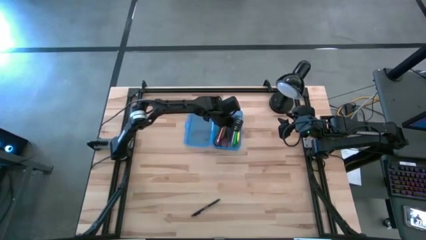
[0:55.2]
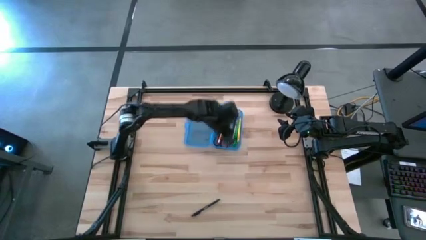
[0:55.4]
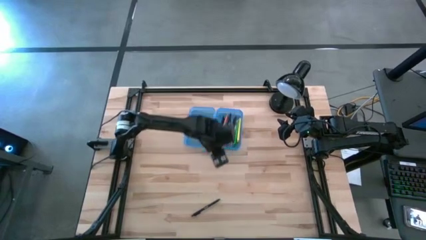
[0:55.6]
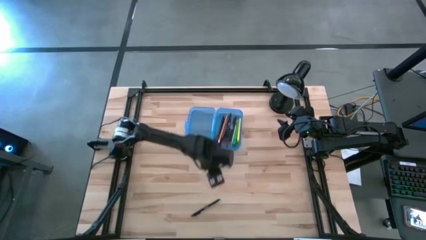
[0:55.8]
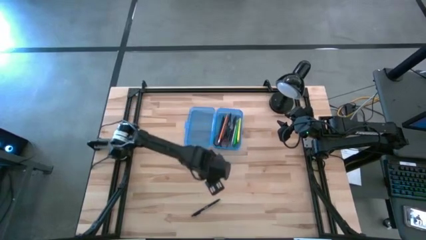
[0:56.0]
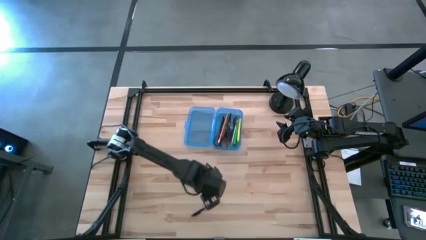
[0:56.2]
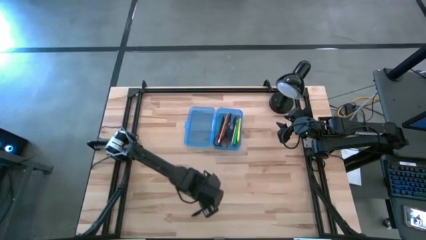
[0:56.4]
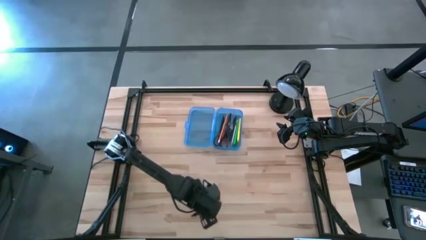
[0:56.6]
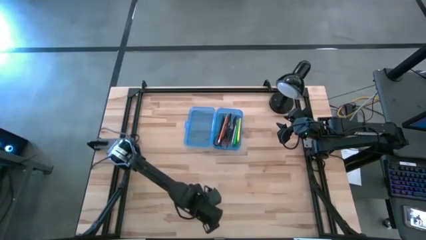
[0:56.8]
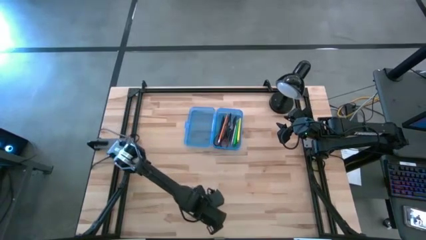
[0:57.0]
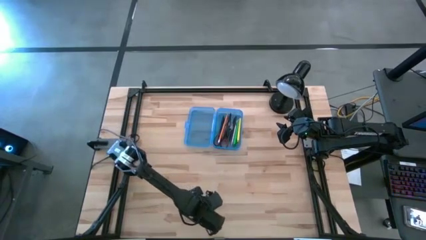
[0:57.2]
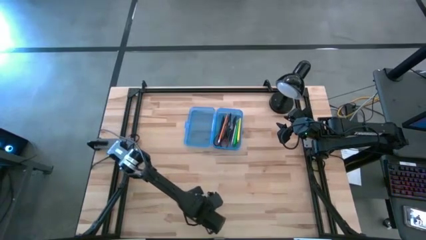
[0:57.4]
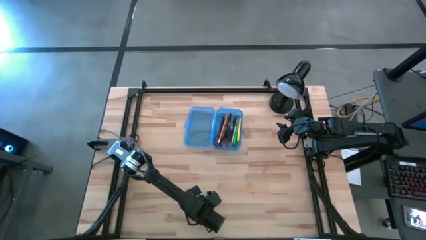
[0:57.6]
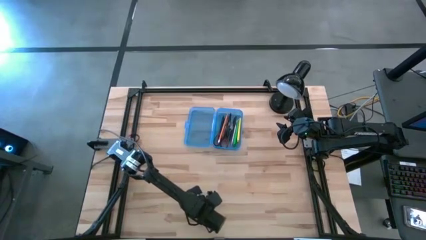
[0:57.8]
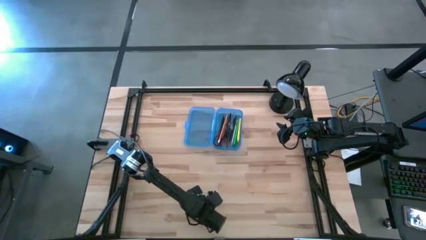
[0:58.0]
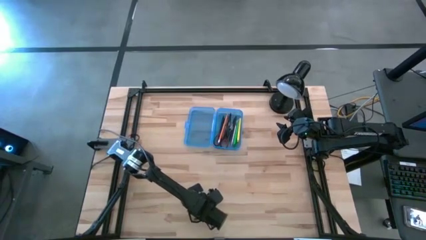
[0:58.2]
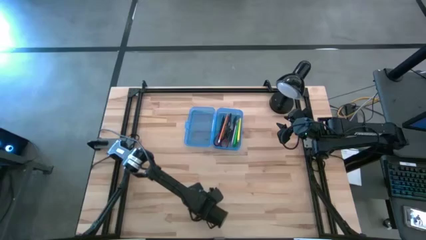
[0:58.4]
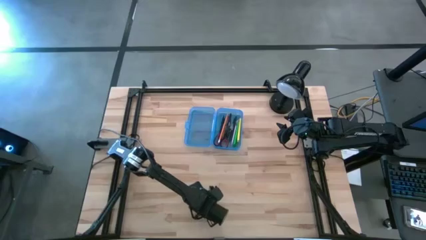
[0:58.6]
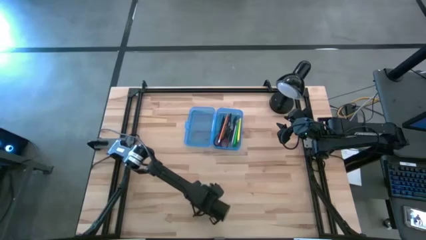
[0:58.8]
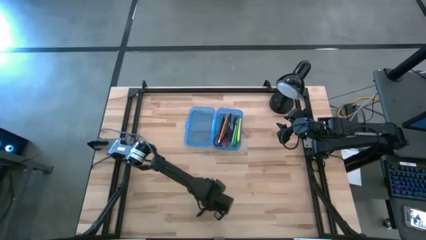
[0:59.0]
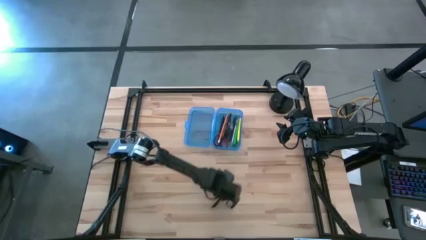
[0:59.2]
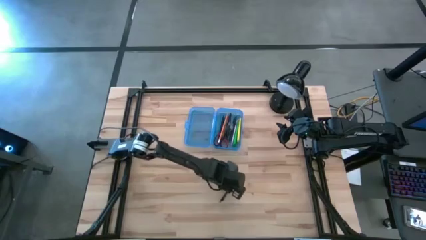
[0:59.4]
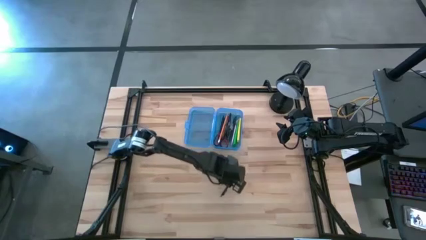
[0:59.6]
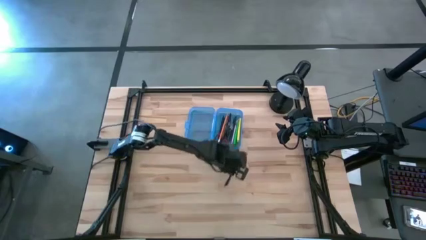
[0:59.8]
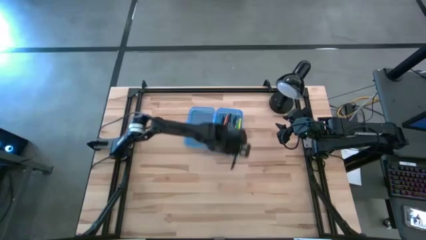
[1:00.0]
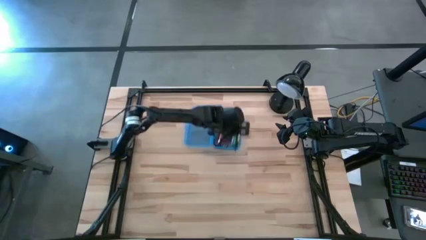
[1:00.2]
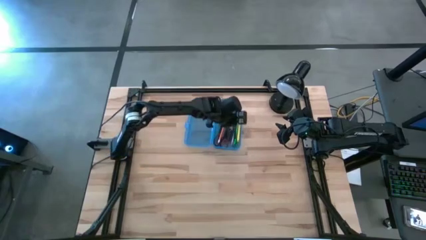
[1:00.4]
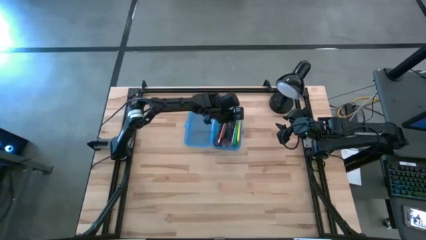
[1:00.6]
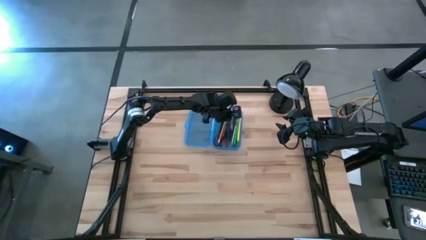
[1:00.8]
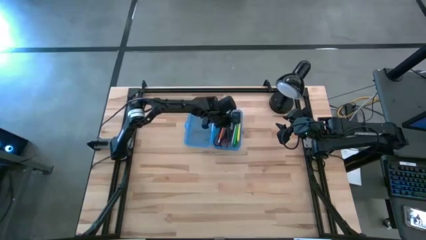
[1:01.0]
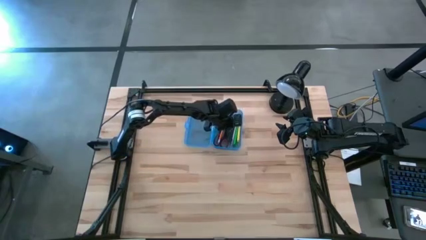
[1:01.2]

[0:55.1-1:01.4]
Task: Pick & place school supplies into a supply box
Put the black pen into the blue box

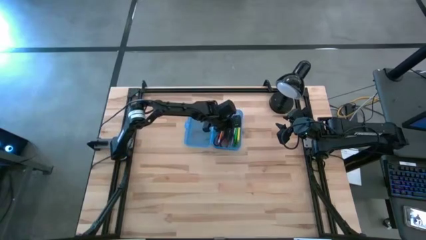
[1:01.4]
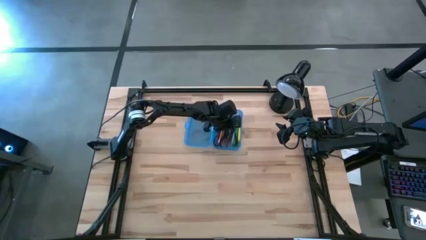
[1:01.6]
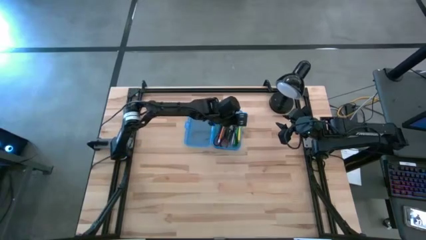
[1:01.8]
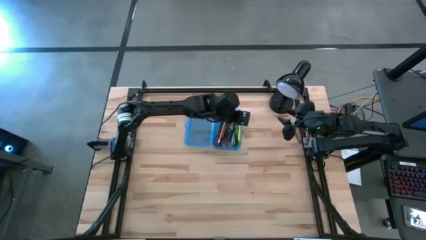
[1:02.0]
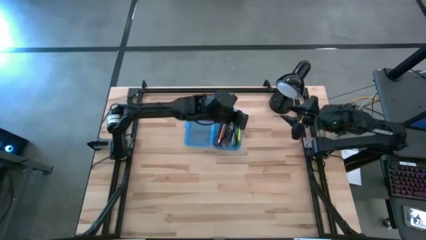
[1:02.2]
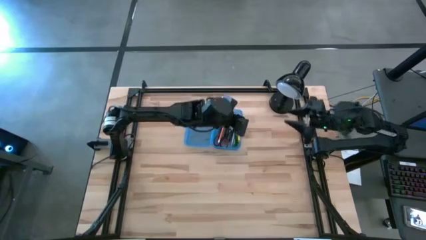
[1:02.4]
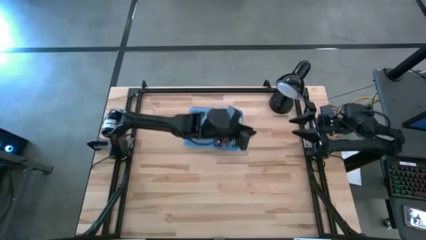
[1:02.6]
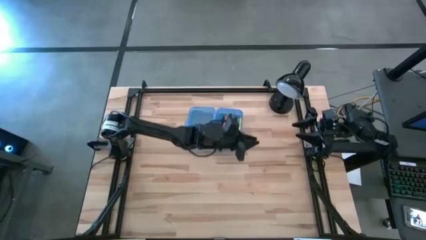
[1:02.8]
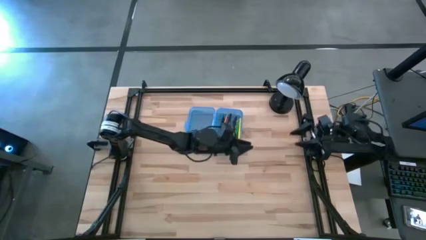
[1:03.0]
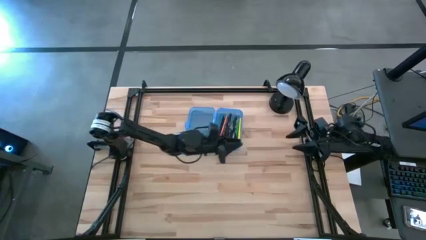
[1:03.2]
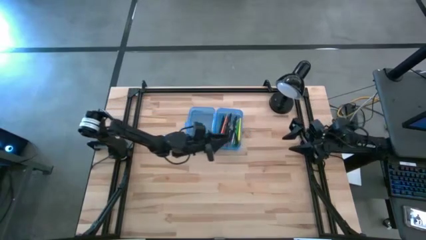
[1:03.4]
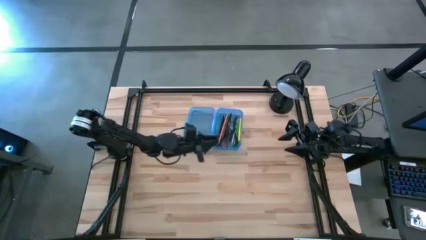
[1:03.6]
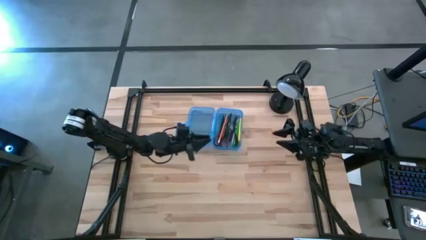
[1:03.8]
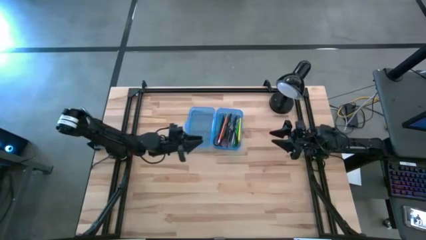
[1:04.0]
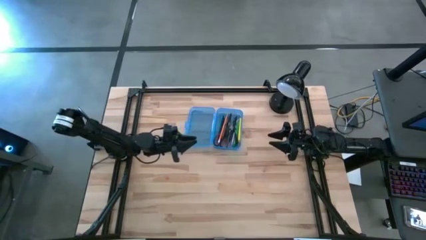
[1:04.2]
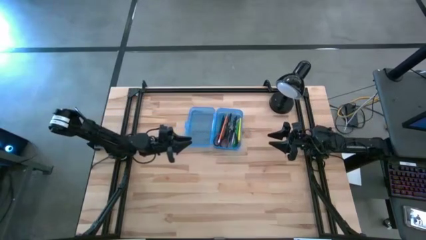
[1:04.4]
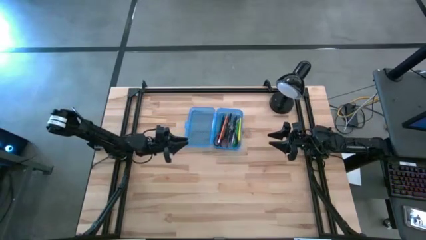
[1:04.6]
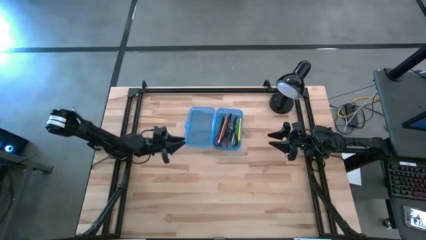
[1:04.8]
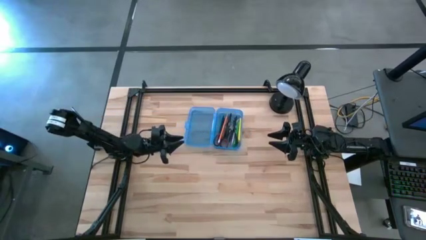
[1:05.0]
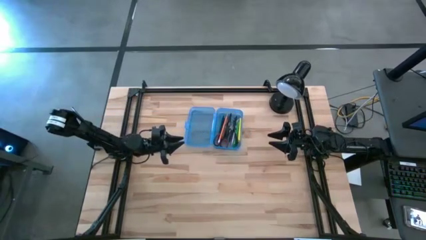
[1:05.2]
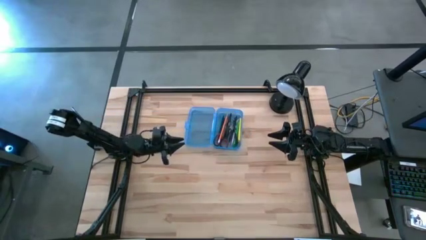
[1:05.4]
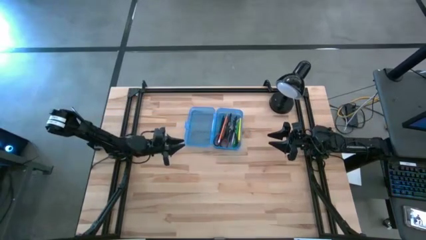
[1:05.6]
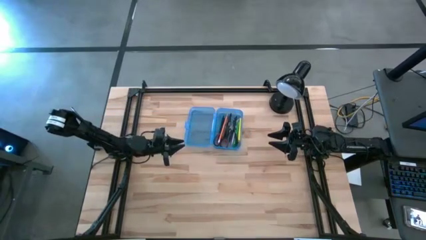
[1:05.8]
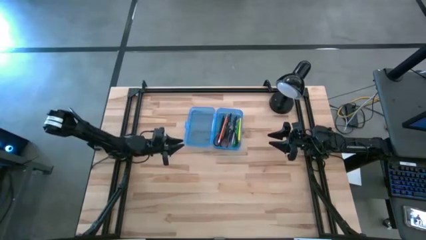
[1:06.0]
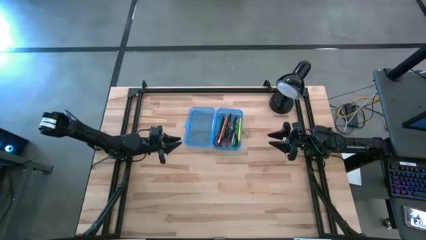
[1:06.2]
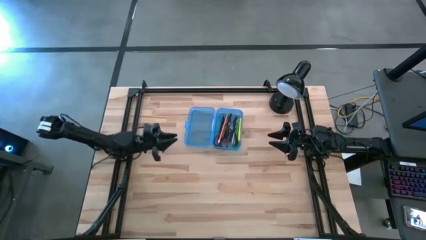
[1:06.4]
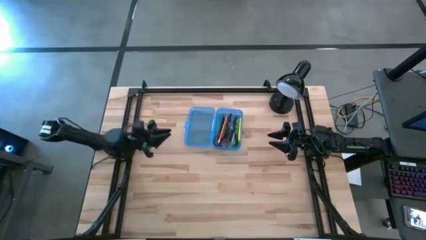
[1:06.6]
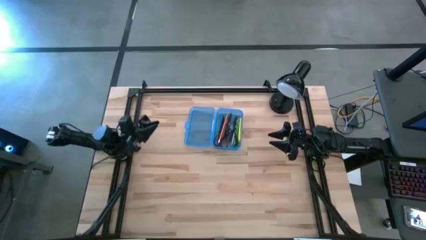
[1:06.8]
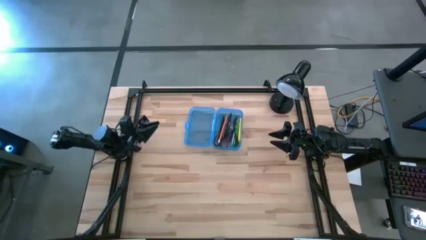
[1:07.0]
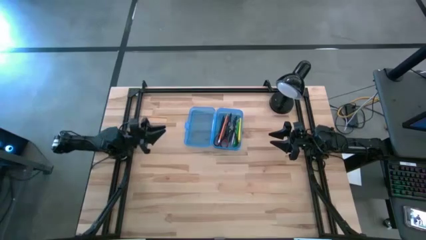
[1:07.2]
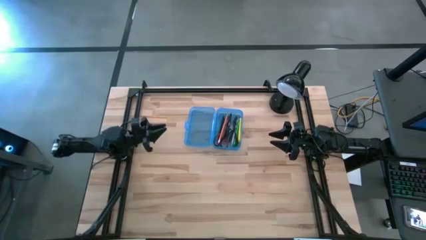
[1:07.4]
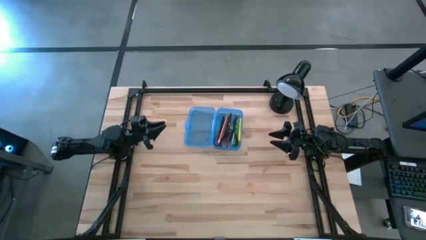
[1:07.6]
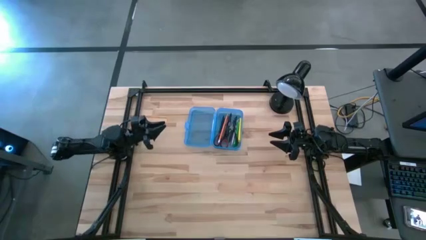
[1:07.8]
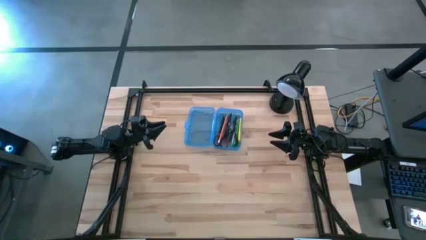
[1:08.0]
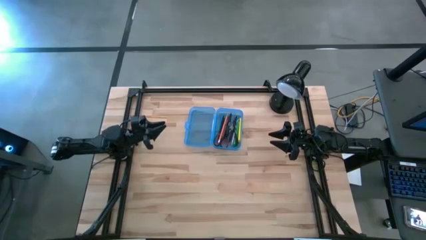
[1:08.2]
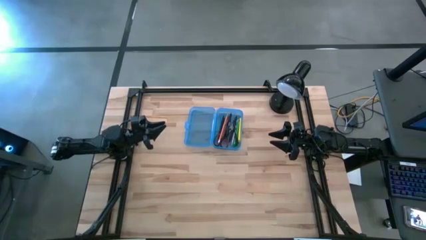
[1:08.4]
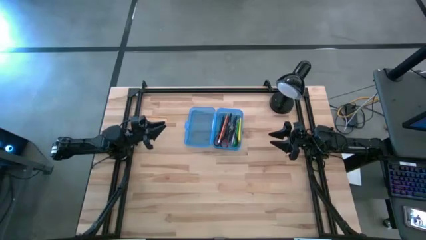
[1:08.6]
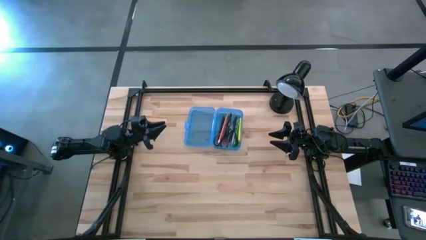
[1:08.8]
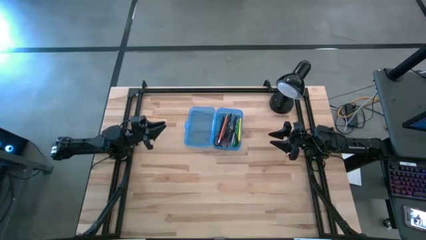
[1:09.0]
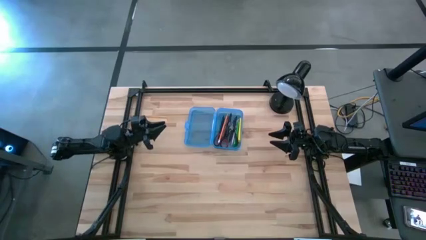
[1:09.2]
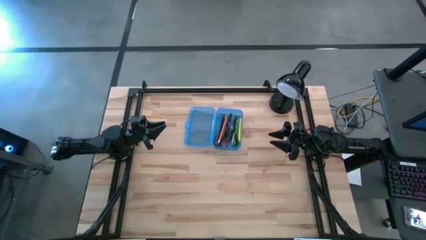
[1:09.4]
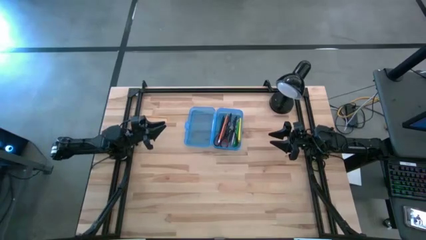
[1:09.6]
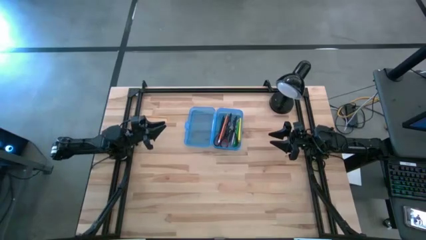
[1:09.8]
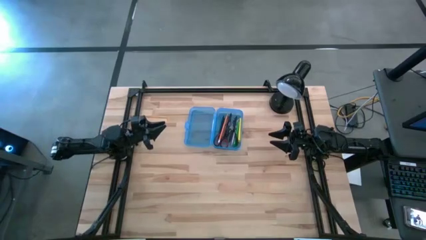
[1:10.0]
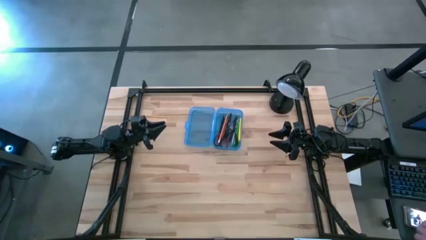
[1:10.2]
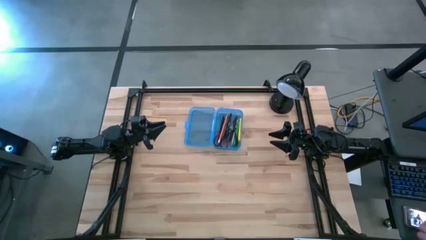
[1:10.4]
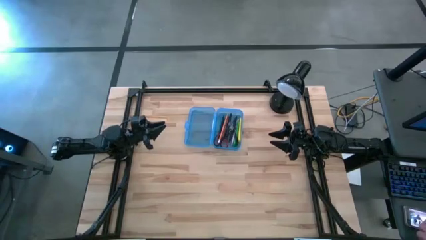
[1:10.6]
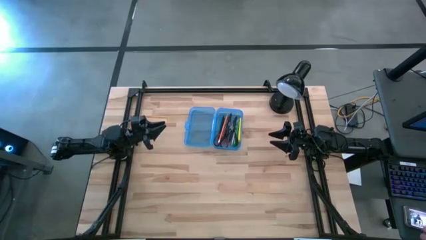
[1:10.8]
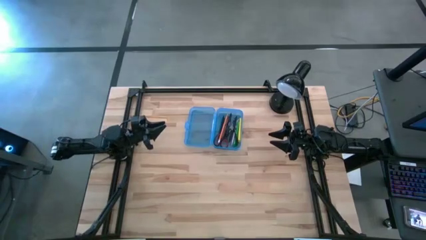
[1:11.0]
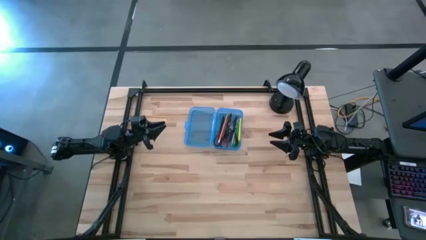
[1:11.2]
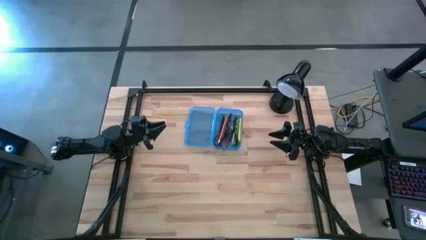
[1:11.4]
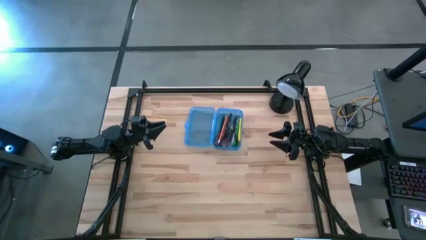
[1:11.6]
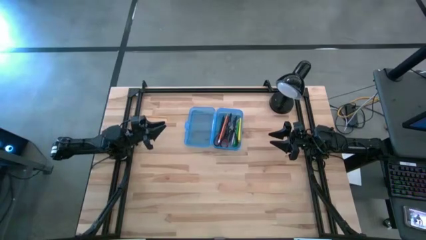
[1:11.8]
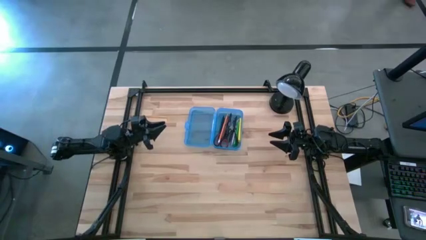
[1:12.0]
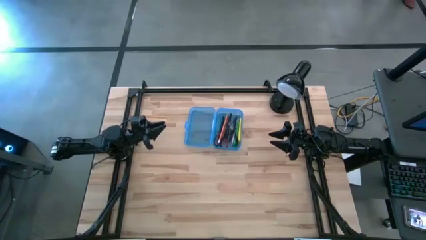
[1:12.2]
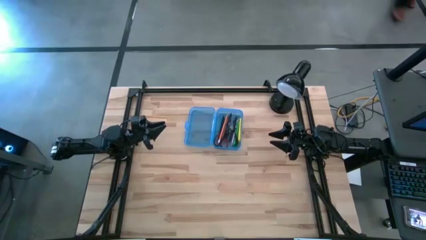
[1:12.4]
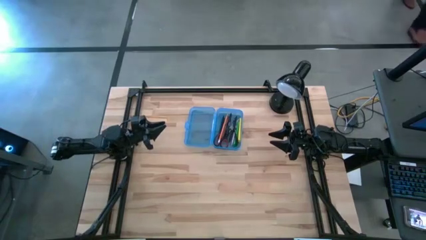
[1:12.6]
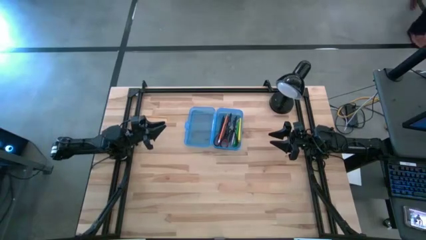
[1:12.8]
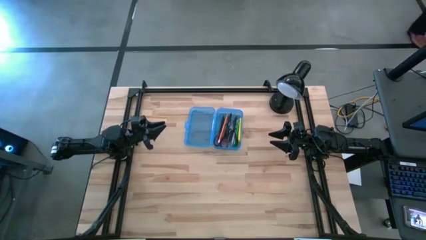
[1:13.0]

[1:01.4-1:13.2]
Return to Home Position
